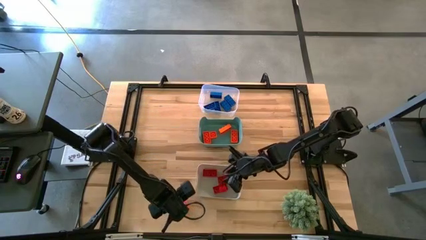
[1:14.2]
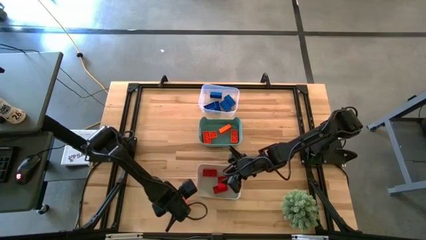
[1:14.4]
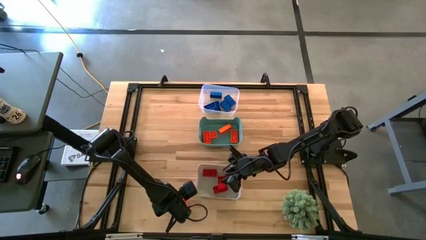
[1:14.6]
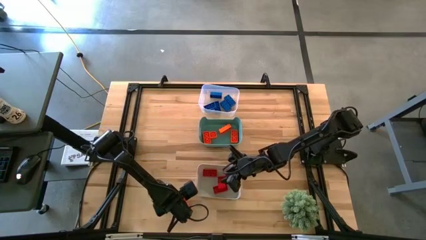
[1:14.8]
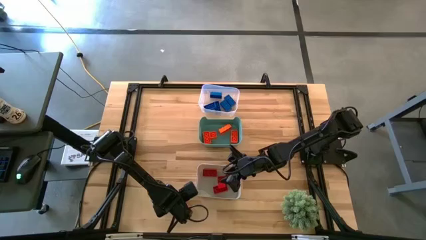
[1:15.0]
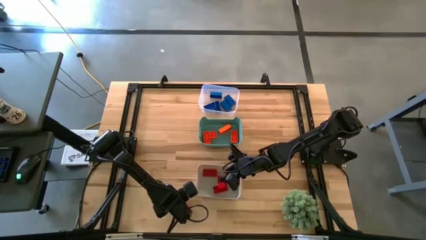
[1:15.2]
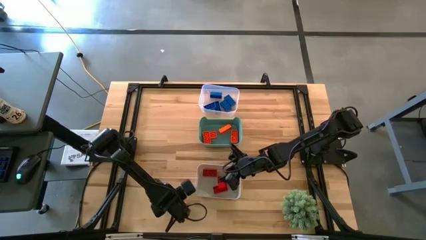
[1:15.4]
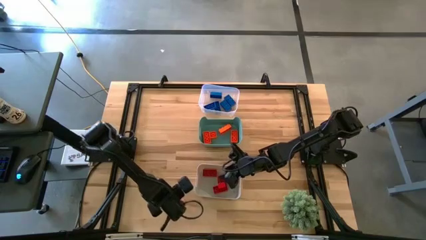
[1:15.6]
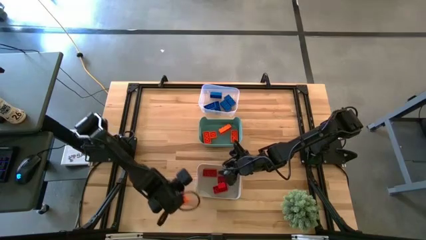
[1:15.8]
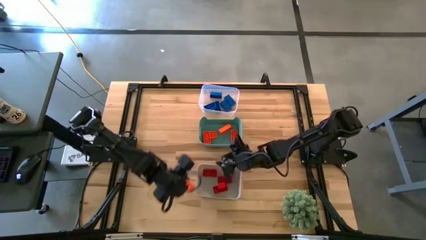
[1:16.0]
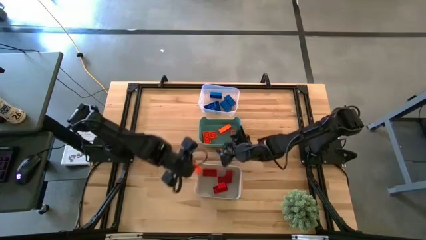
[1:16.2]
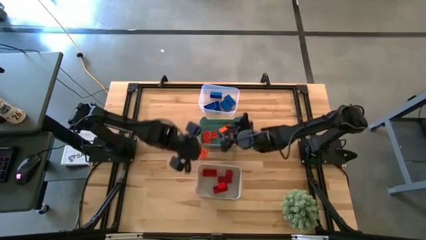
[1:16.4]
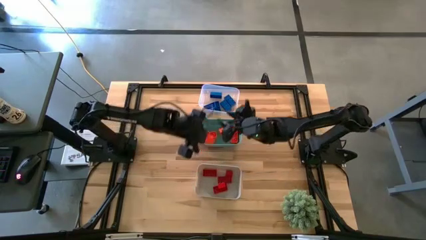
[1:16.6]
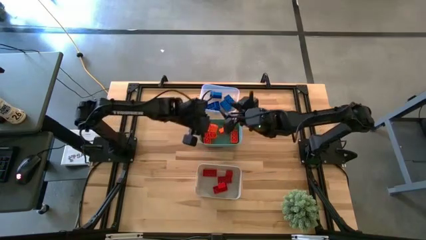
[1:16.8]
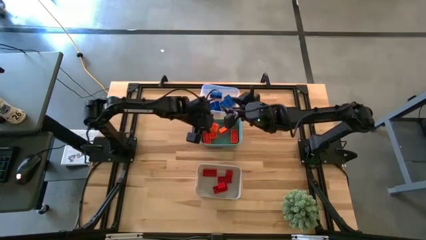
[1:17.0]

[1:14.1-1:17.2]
Task: Sort & place blocks by color
Put the orange game piece into the green bin

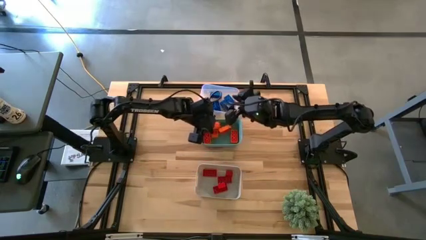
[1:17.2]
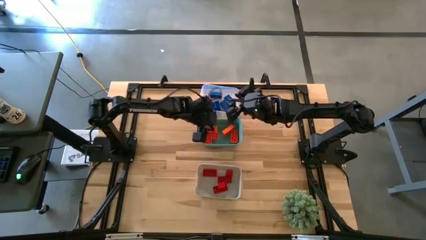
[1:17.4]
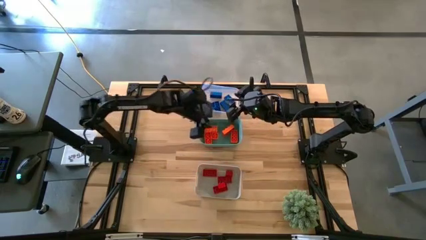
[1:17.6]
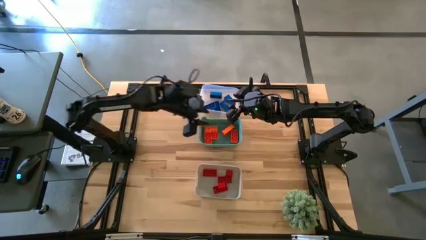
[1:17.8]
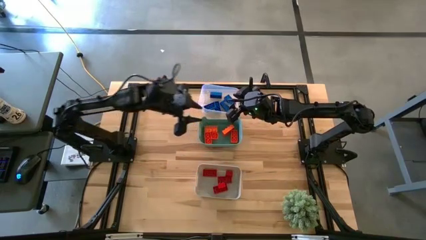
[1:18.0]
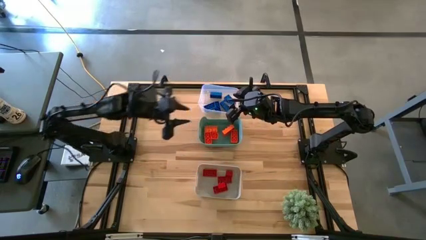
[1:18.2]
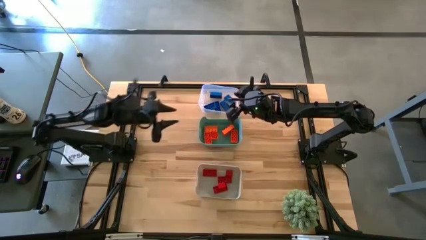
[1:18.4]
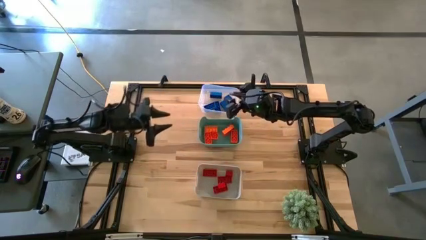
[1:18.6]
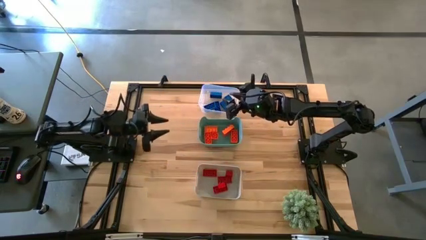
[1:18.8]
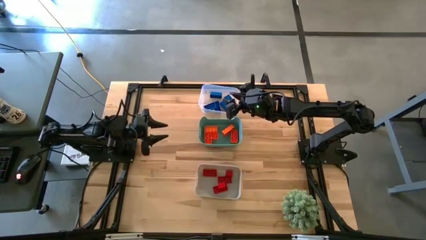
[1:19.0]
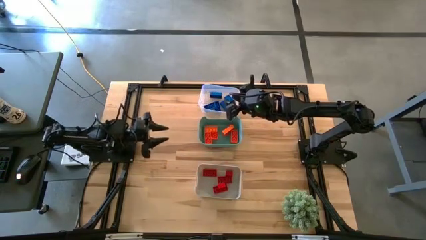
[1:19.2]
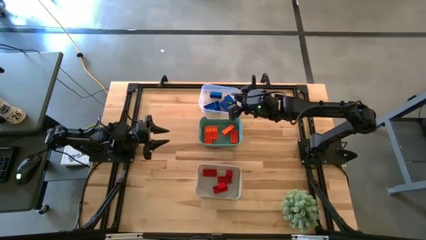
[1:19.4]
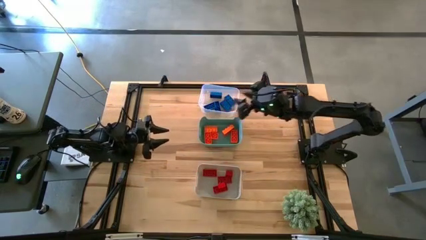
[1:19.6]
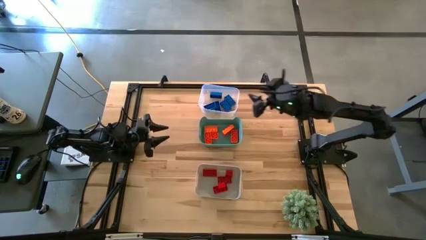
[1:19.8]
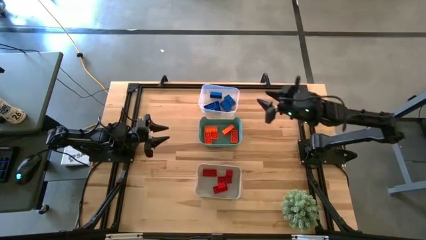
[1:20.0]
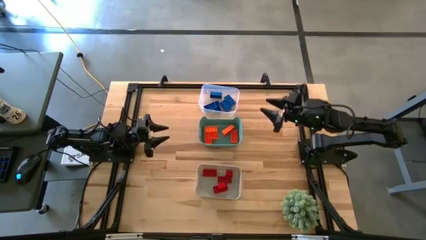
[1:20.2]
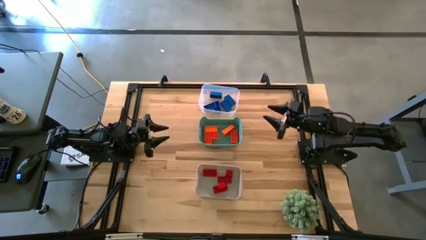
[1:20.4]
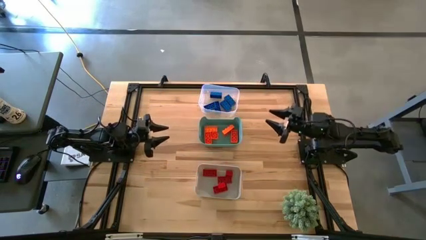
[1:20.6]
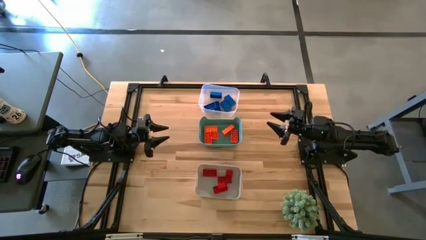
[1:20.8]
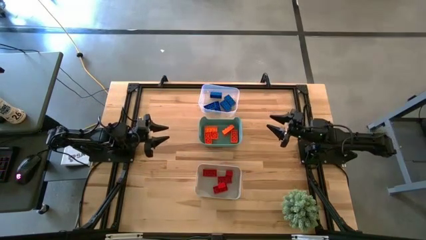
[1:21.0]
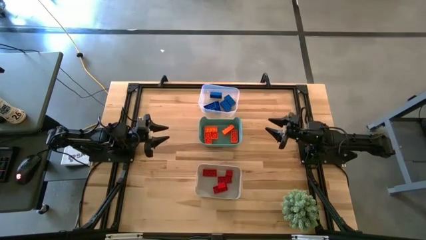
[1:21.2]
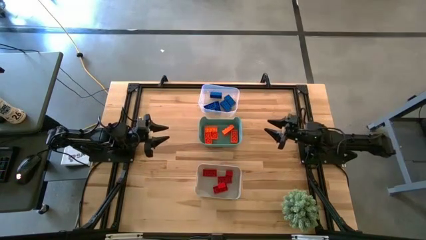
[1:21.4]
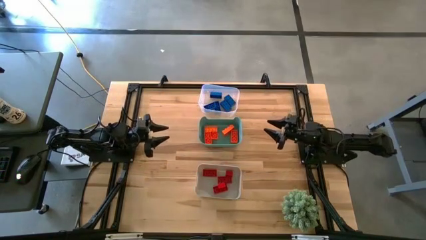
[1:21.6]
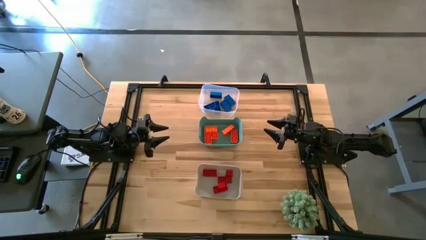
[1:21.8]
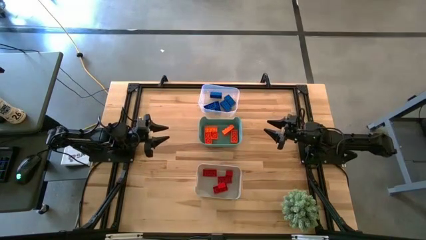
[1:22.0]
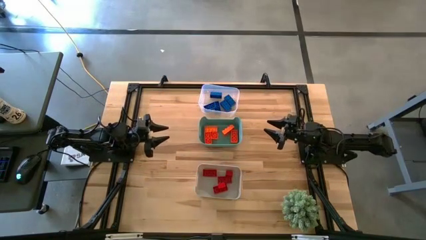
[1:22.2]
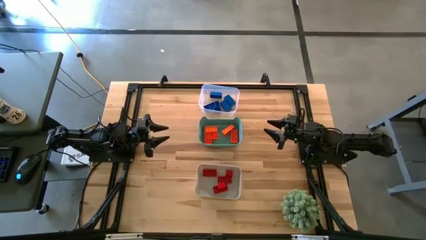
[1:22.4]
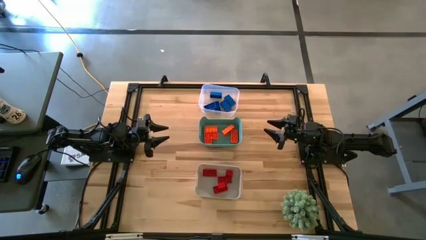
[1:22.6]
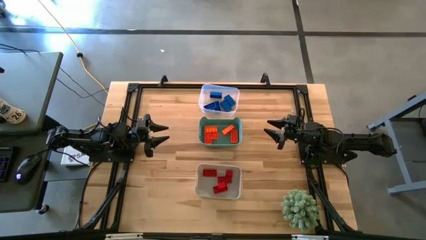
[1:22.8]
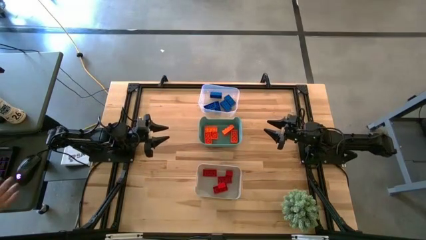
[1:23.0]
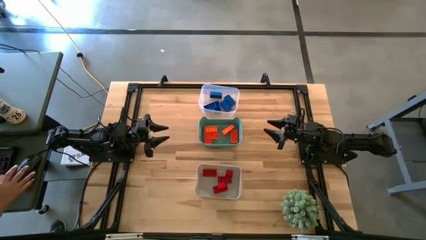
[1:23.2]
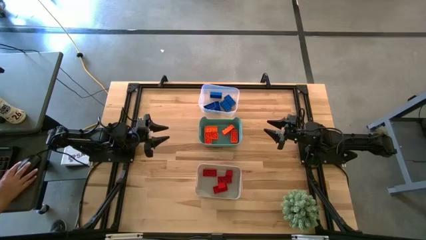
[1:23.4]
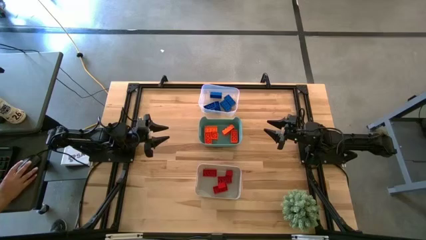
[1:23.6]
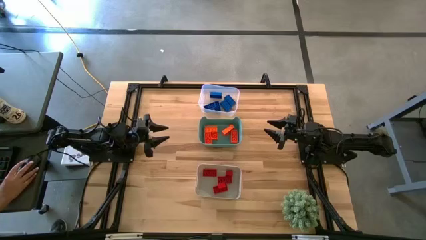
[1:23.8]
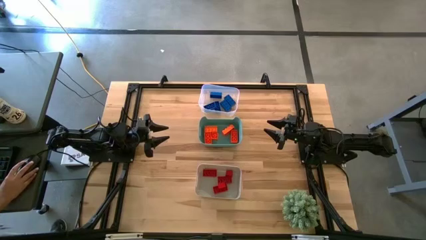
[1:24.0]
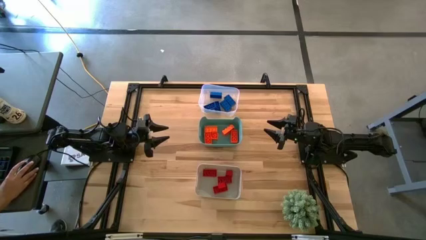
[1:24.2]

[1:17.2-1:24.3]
Return to Home Position

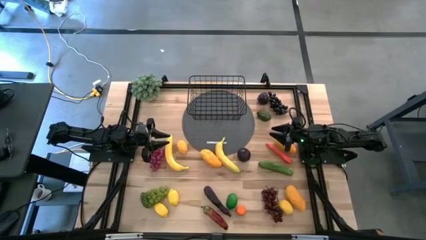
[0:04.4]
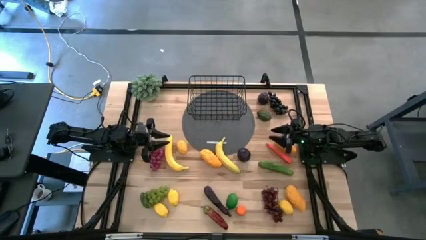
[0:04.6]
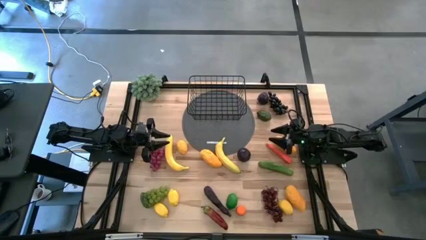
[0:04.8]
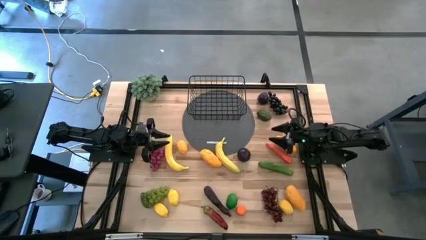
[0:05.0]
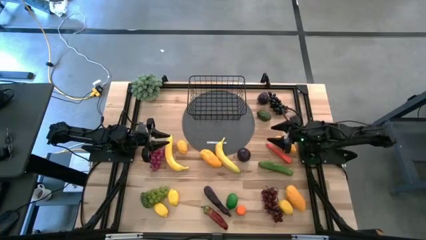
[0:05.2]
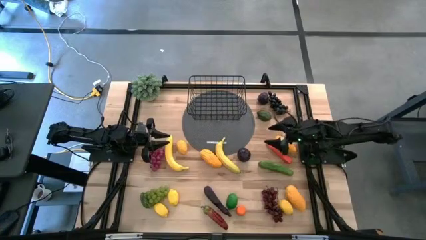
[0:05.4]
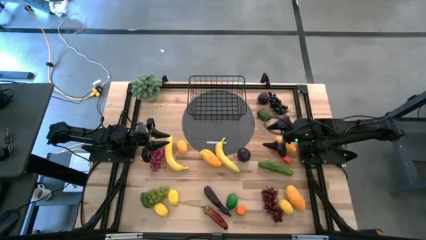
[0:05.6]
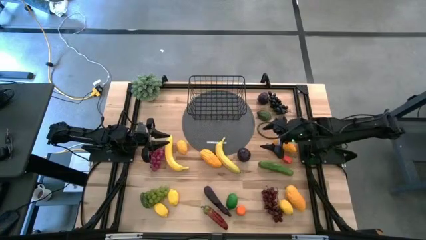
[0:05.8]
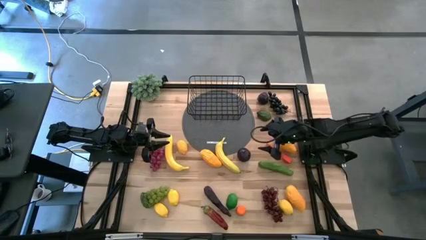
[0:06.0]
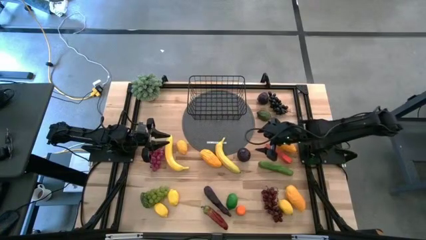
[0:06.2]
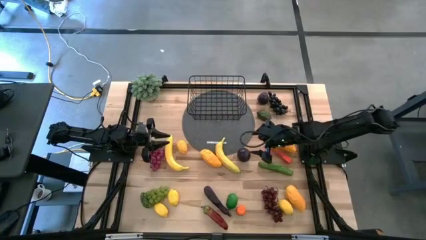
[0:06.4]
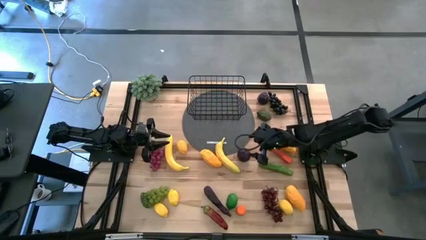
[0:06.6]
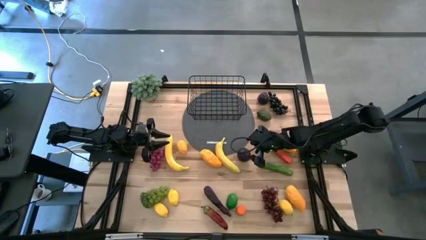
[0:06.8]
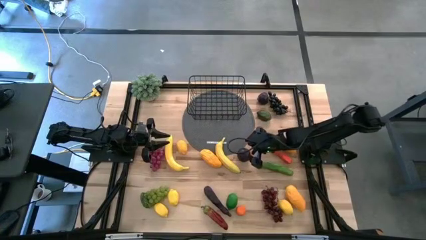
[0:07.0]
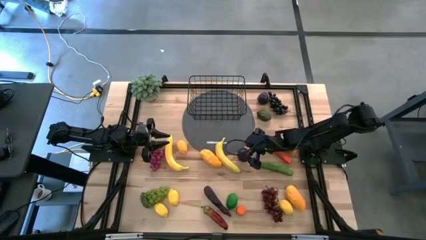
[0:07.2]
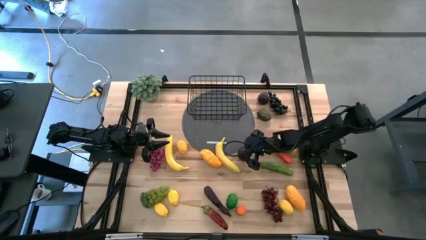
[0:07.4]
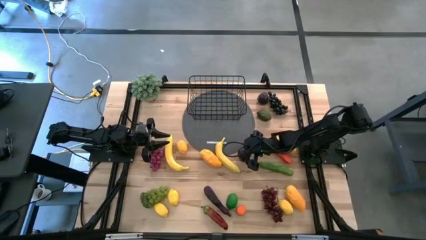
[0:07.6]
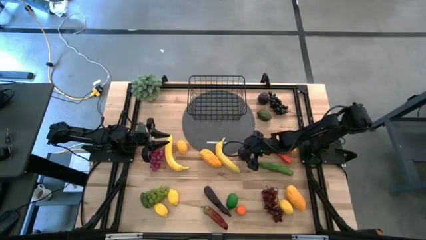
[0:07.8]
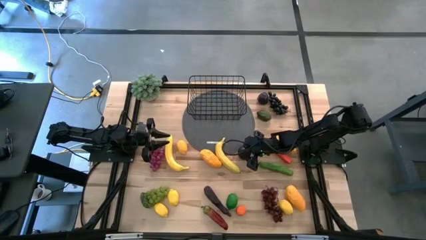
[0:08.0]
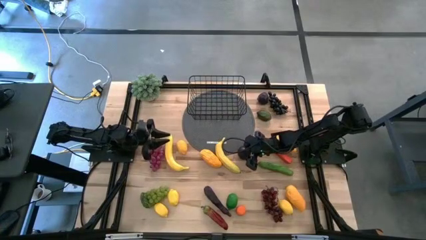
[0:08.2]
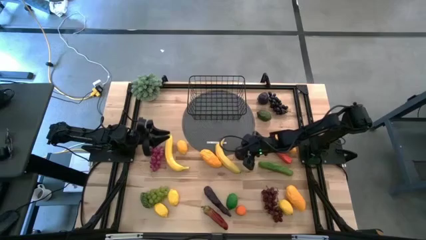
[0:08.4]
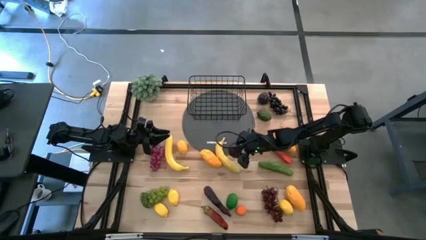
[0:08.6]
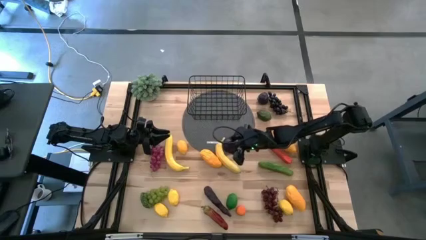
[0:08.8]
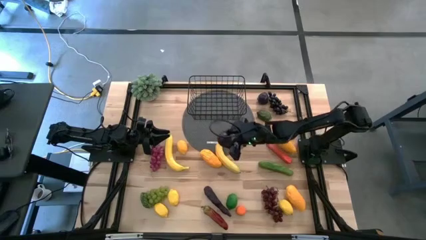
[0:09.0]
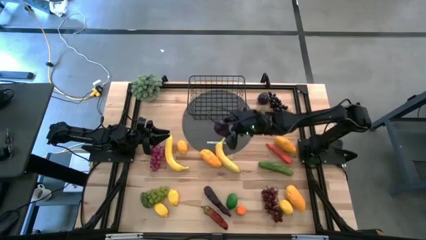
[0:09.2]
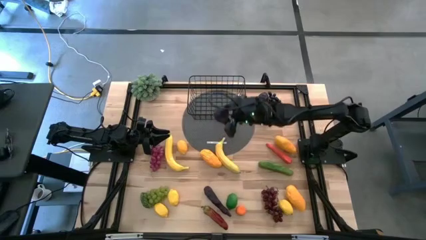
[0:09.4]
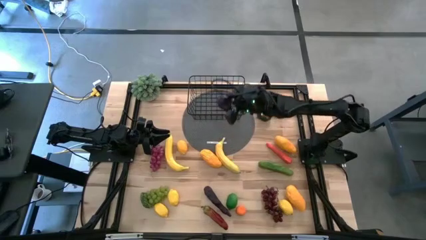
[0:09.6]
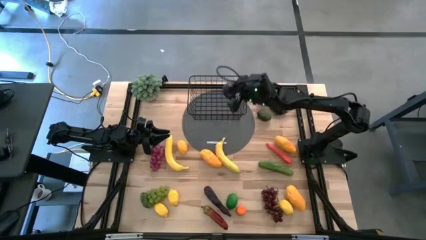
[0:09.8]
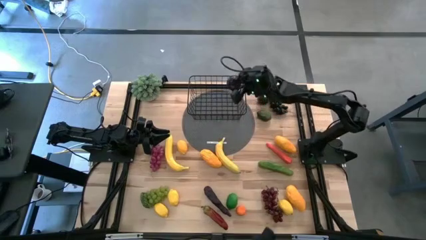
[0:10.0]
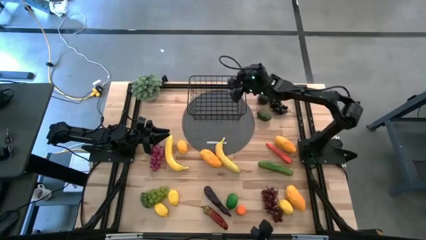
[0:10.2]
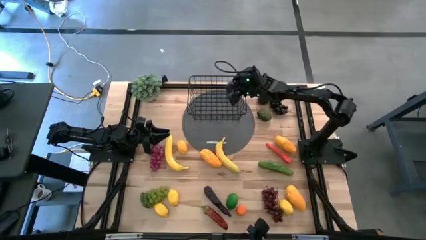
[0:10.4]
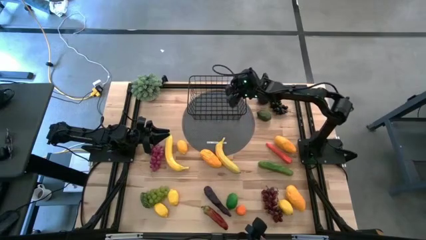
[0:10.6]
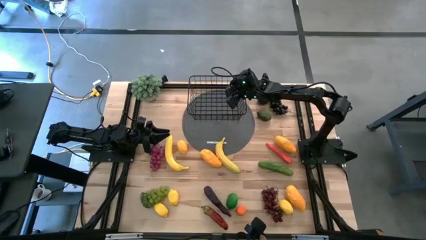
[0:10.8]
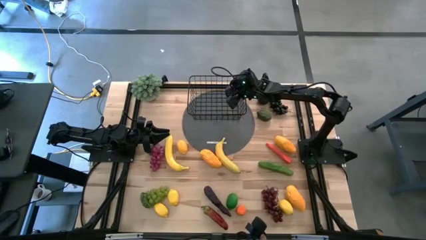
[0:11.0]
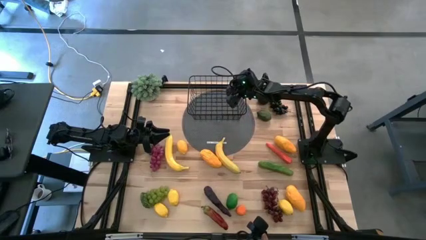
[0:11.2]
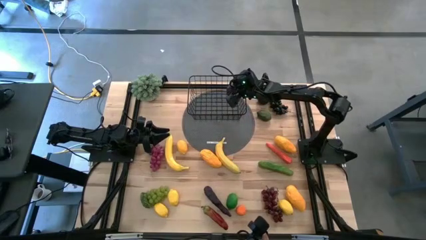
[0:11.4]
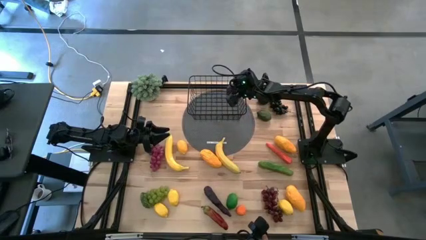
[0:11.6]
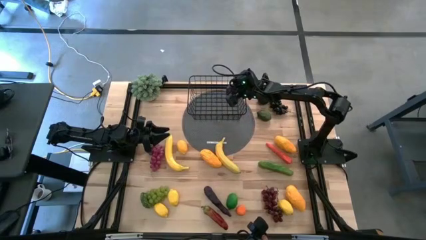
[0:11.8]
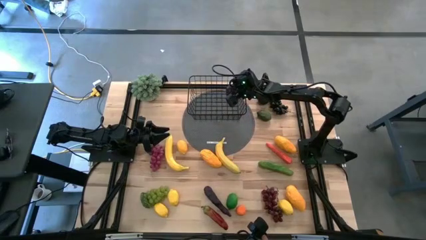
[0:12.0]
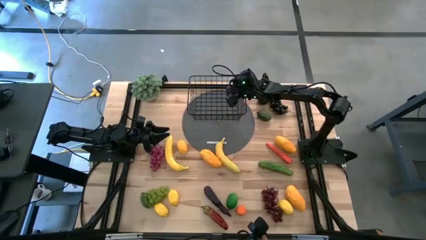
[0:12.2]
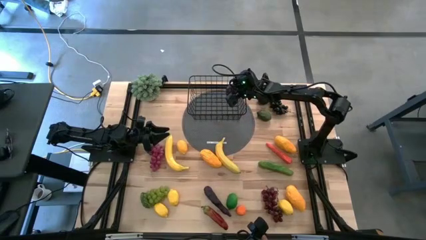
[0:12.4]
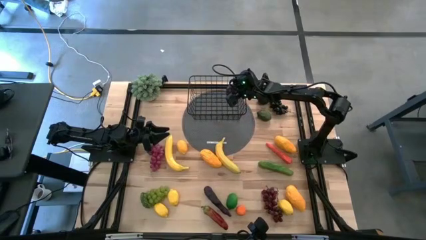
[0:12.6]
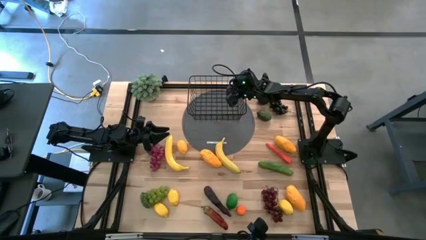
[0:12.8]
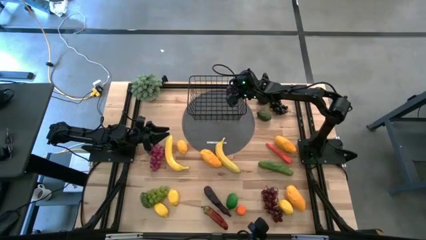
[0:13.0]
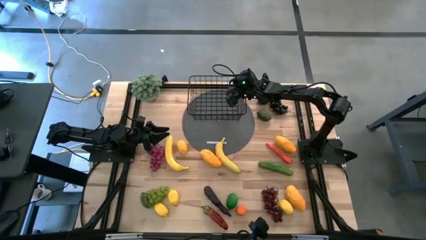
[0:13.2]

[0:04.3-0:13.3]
Task: Build produce basket
Put the purple plum into the black wire basket
